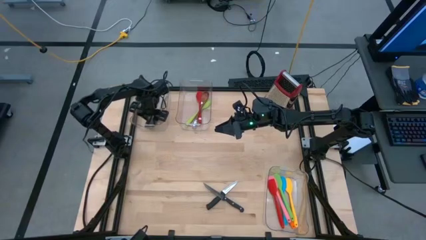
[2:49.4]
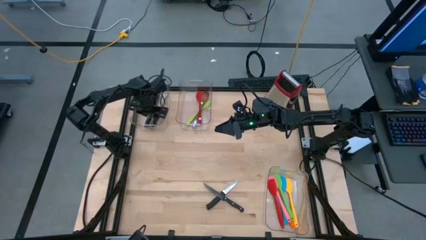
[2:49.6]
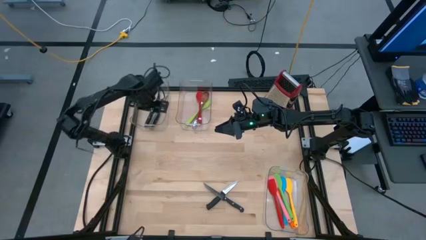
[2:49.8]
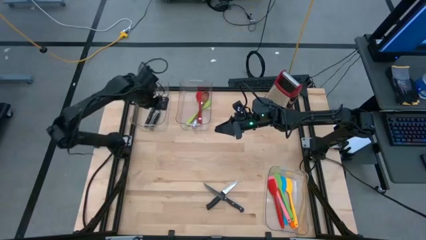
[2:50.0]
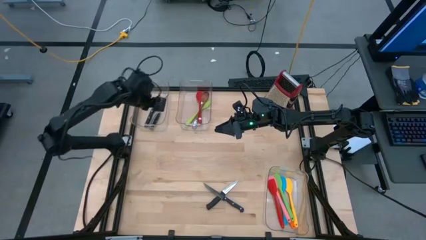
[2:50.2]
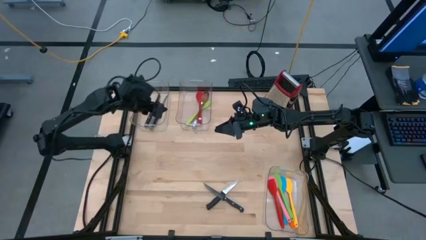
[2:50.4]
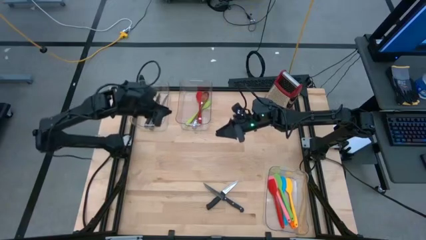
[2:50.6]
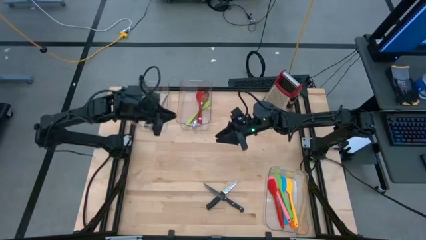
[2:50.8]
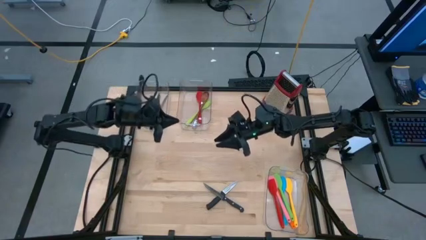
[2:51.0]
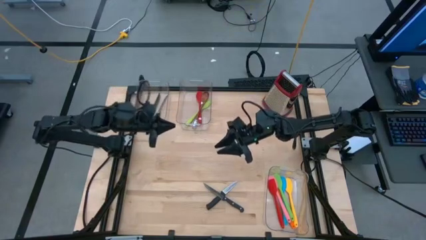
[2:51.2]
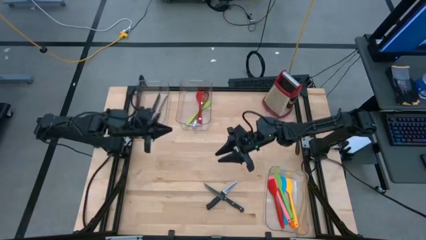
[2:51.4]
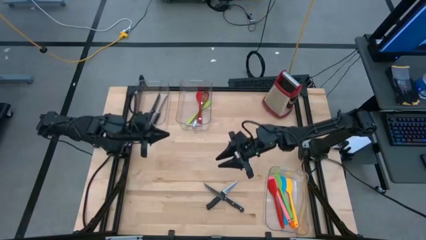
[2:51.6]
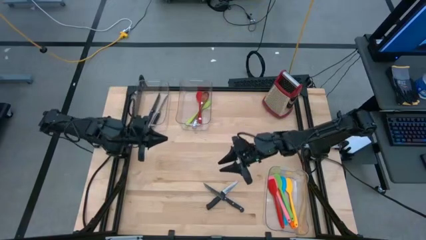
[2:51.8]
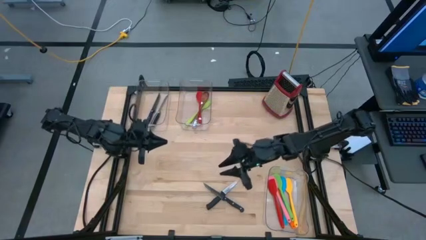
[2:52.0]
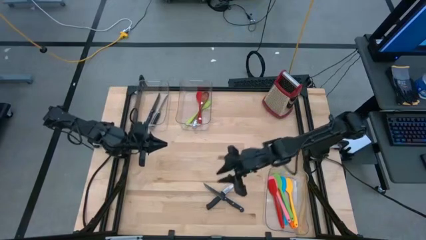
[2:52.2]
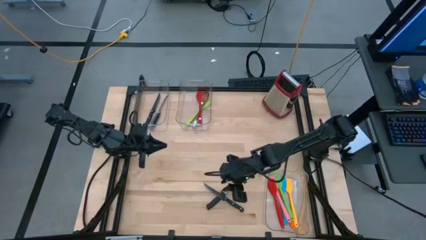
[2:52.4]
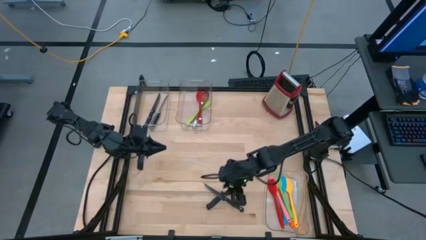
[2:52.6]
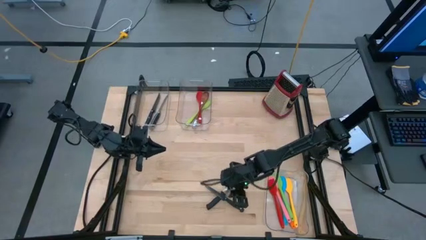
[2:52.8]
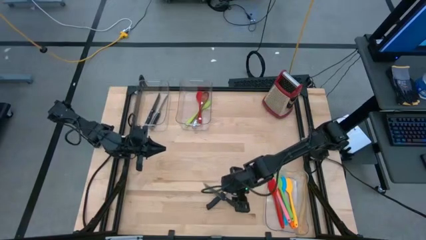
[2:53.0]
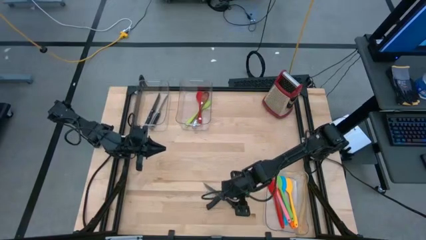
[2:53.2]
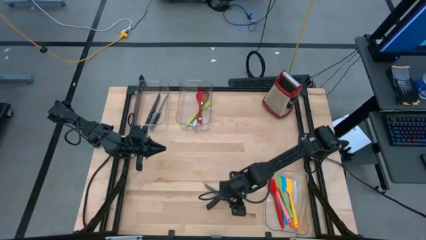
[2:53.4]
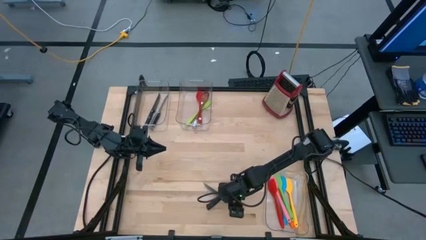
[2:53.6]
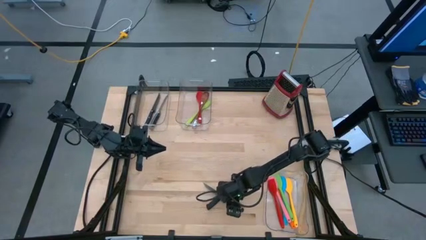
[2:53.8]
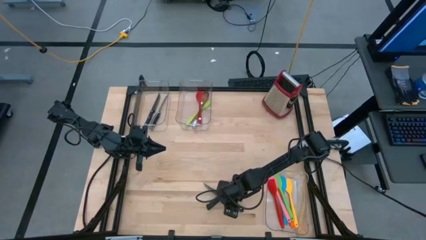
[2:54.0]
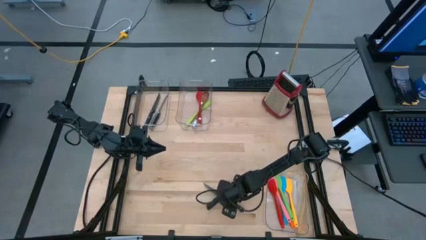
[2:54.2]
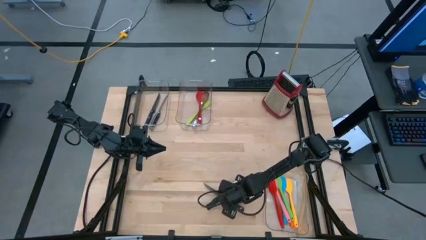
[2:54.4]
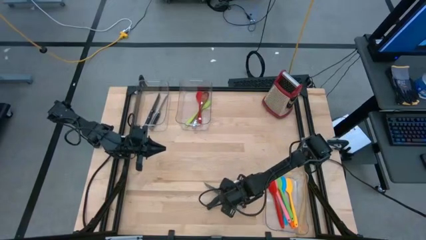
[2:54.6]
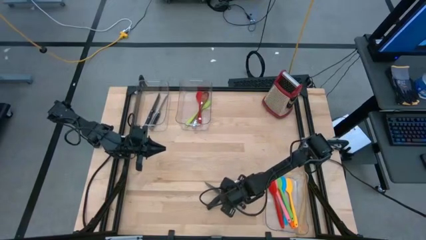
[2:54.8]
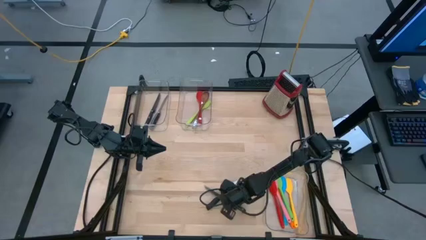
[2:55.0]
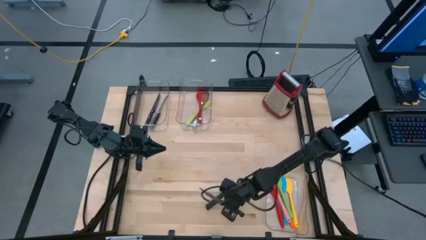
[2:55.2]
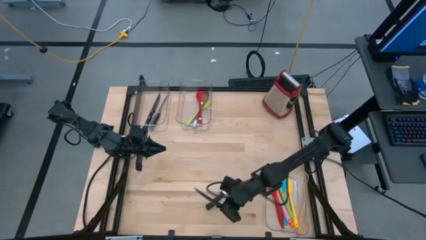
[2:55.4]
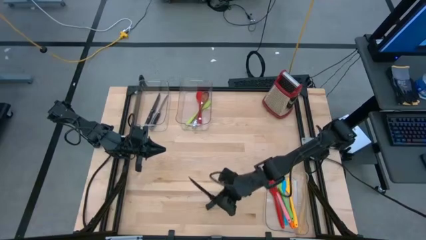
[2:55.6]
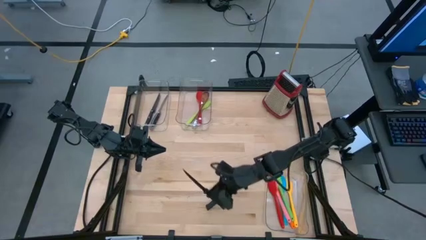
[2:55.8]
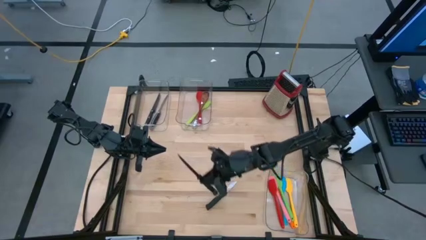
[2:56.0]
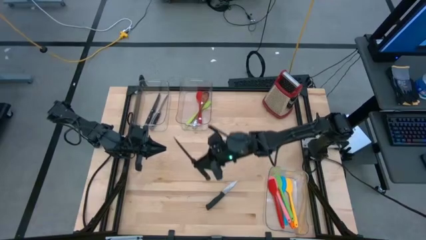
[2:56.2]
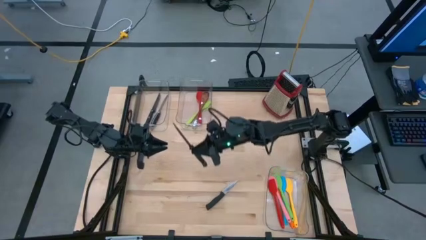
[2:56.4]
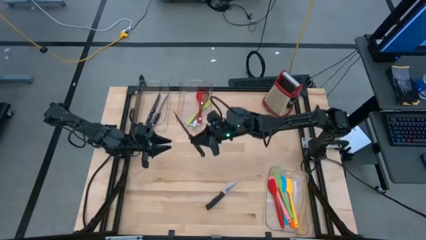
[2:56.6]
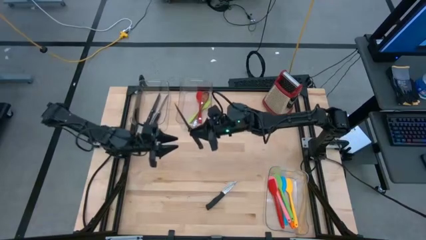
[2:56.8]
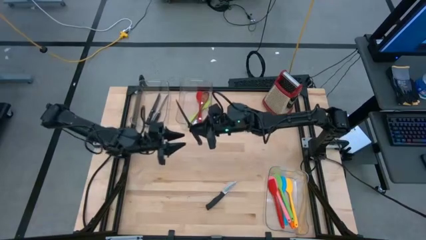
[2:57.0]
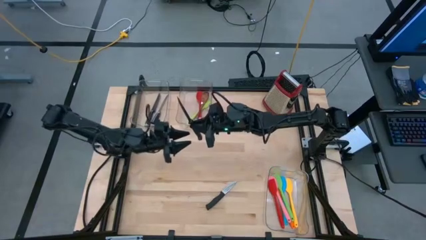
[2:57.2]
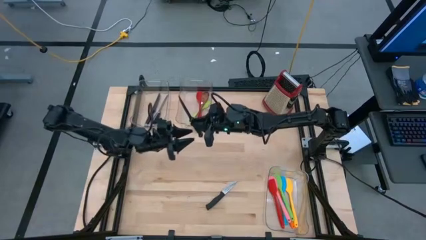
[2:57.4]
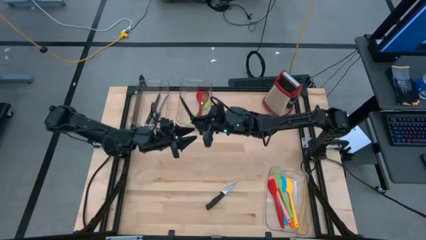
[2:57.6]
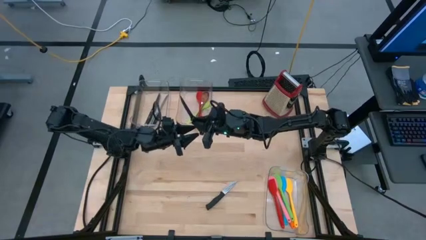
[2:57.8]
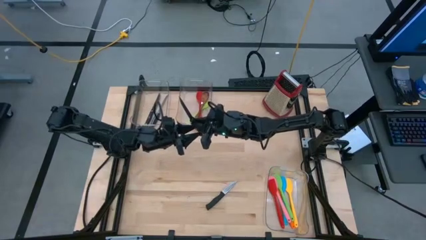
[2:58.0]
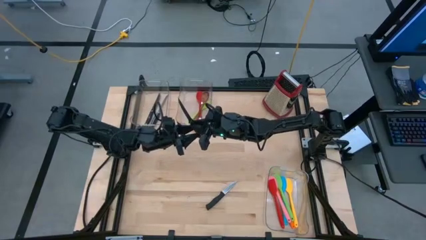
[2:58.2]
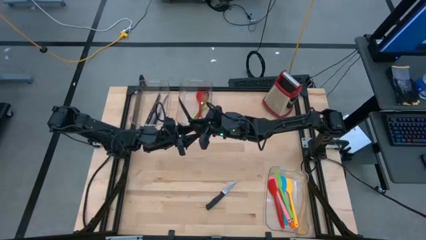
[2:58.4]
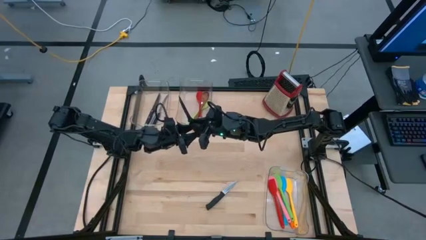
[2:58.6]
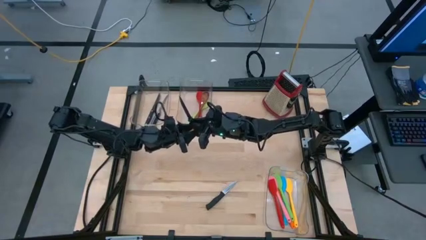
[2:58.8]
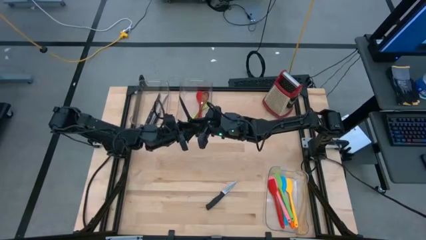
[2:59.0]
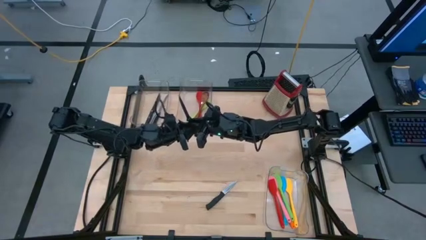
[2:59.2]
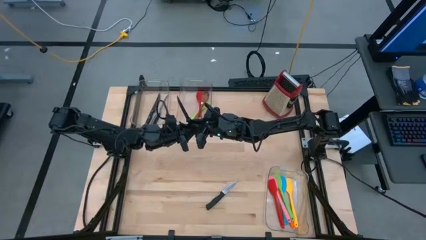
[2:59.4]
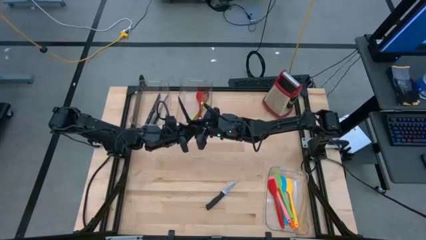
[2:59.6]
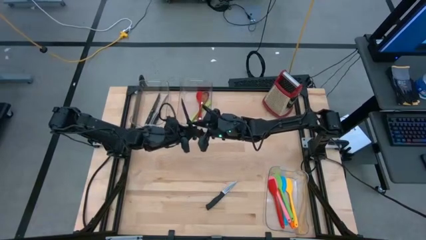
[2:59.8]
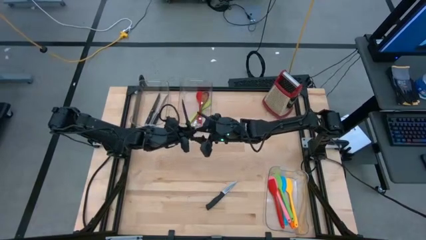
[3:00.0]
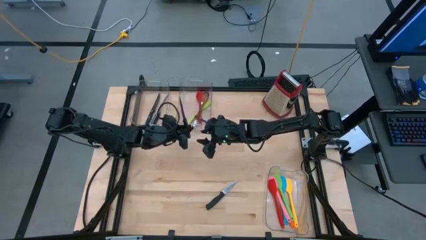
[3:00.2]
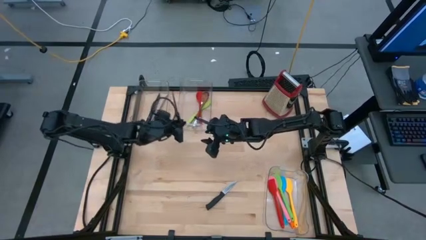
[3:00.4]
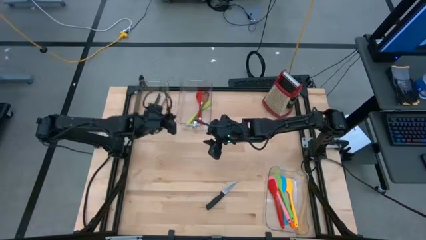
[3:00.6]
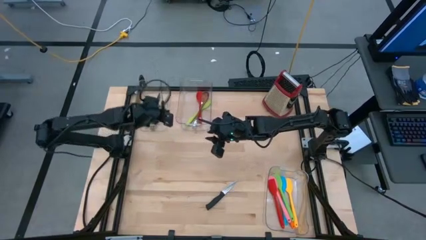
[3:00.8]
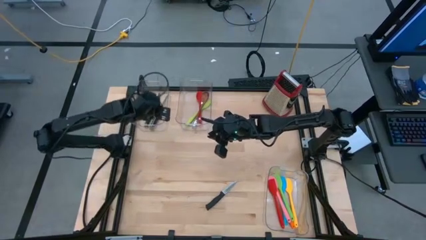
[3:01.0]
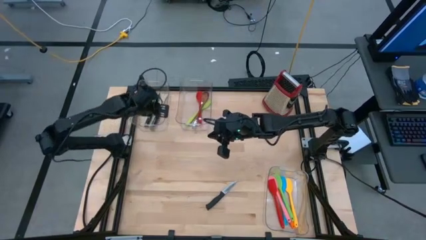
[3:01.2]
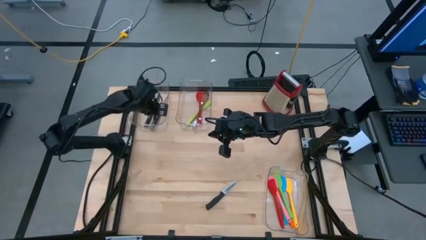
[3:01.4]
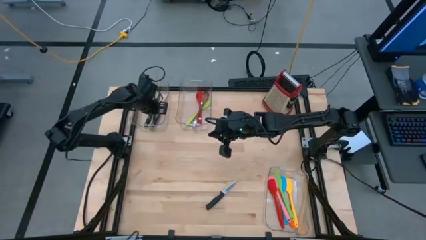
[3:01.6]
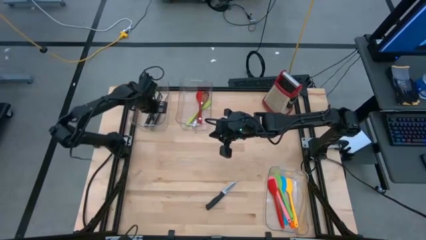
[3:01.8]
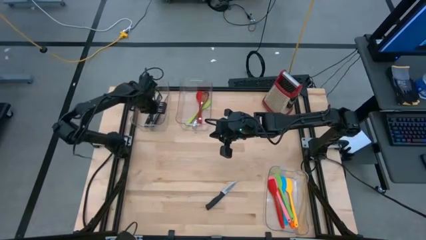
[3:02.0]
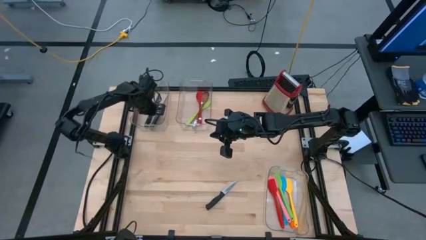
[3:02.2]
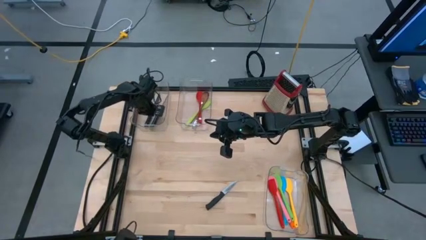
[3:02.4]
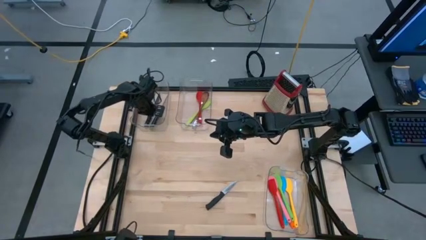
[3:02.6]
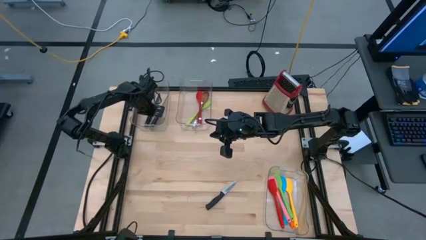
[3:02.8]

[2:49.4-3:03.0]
Task: Pick & Place Kitchen Items
Put the black knife into the top left transparent bin

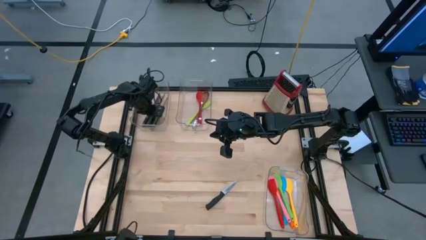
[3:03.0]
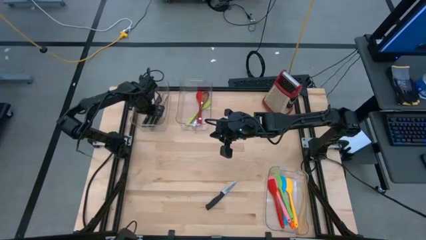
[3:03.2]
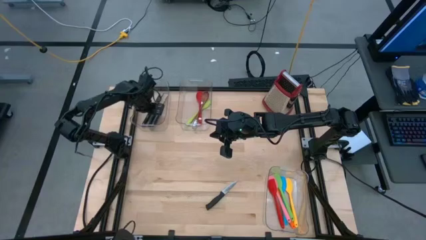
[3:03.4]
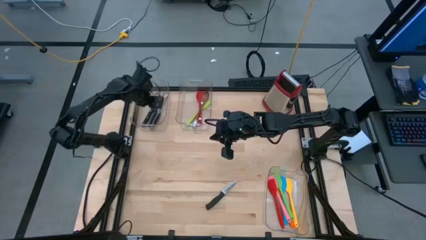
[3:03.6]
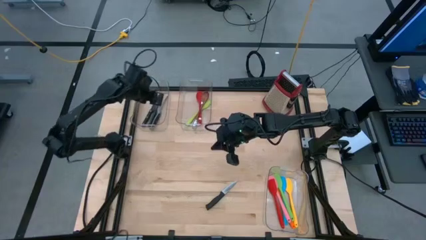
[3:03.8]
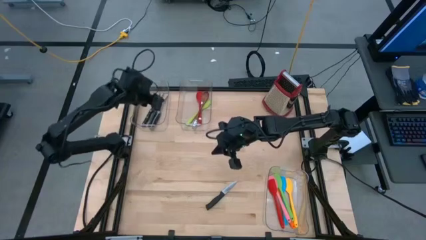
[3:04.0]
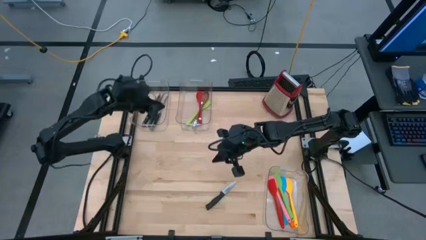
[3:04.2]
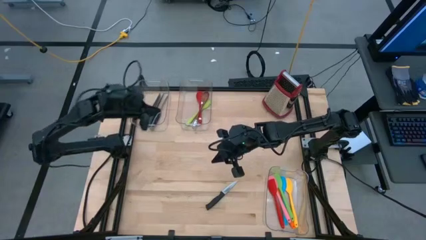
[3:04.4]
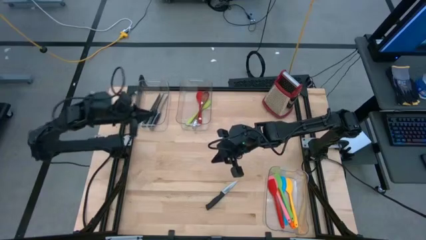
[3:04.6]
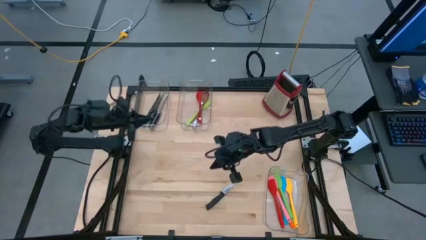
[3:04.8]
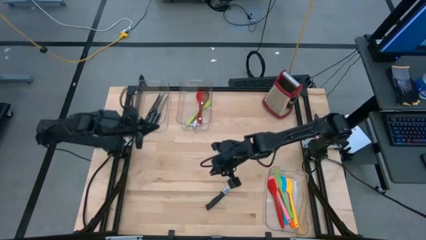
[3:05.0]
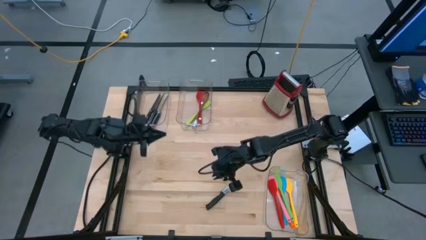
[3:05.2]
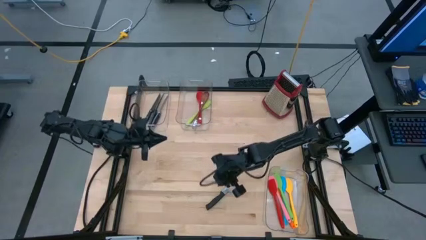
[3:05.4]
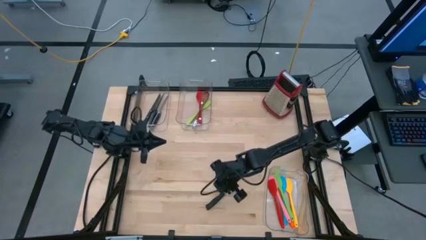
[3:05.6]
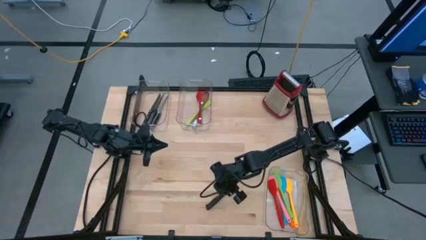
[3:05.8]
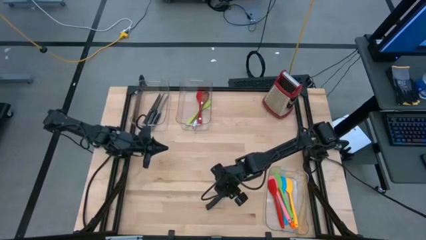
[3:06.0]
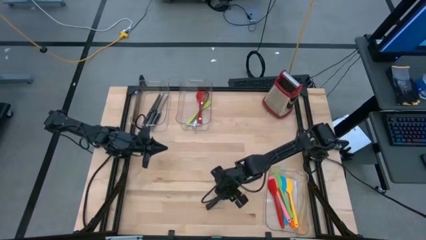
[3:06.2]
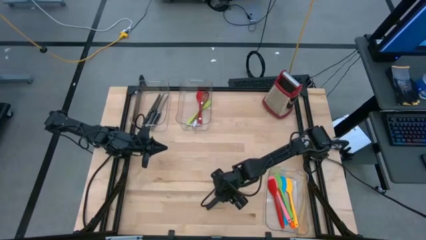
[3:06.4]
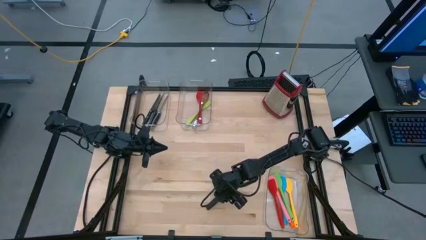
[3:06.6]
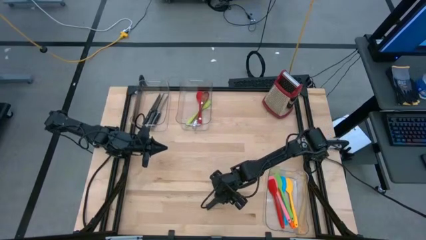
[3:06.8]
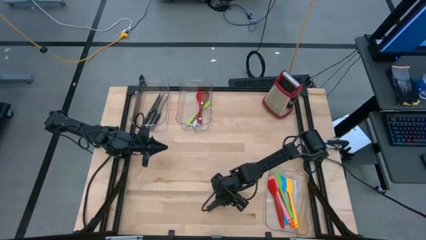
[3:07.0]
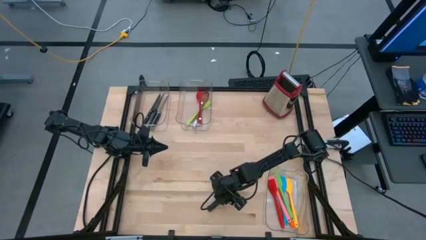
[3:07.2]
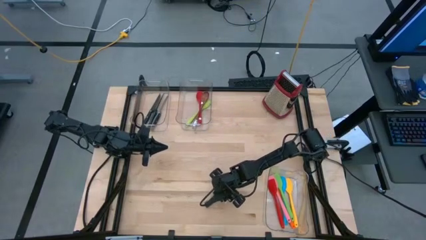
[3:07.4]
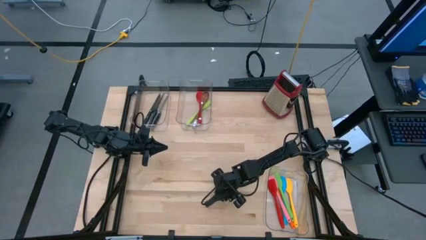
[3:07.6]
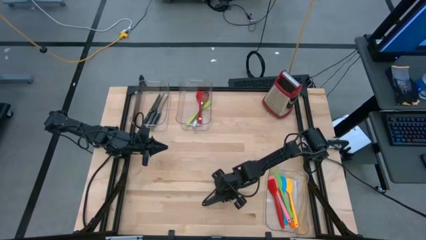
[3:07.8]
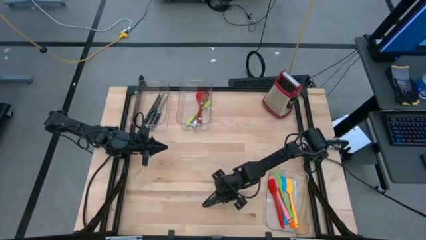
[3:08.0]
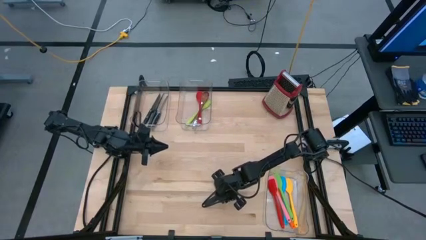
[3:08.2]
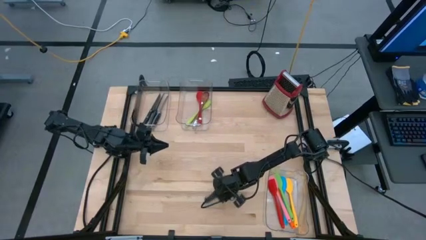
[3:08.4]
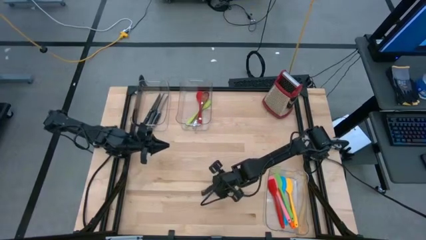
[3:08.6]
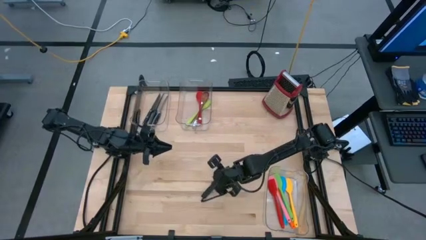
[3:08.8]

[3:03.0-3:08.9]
Put the black knife into the top left transparent bin
